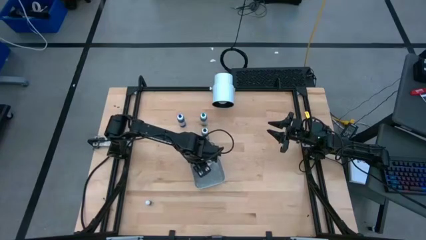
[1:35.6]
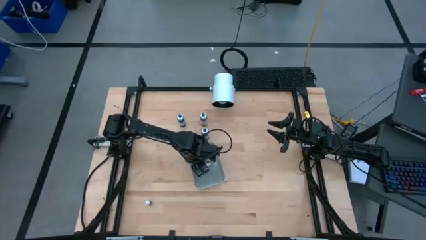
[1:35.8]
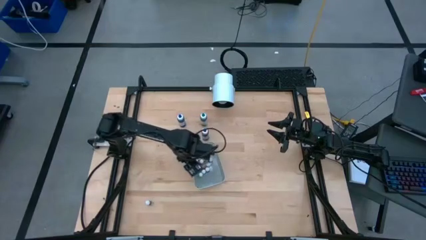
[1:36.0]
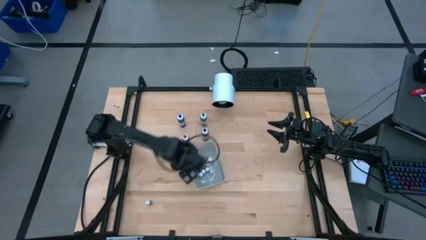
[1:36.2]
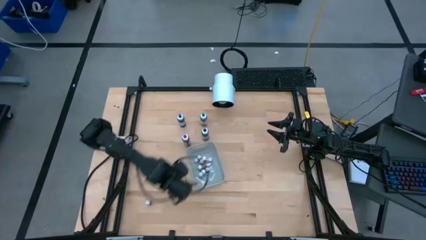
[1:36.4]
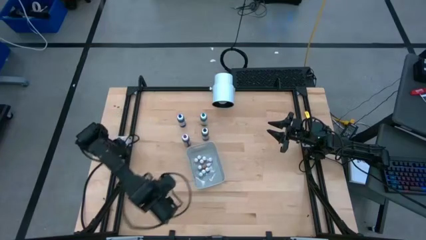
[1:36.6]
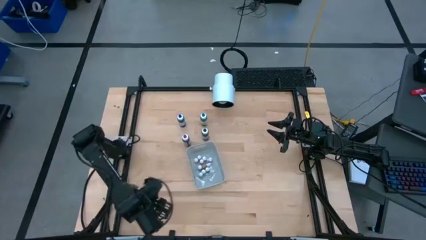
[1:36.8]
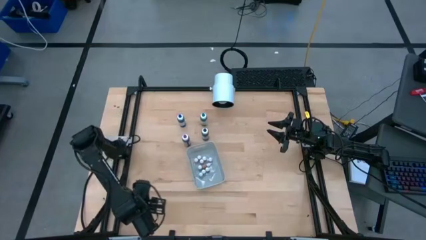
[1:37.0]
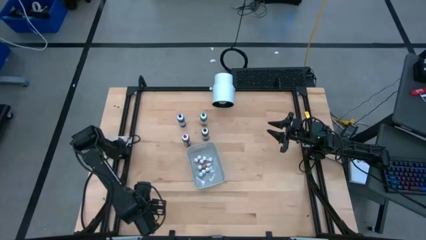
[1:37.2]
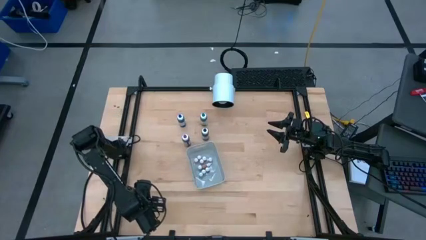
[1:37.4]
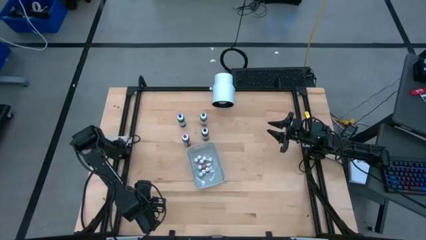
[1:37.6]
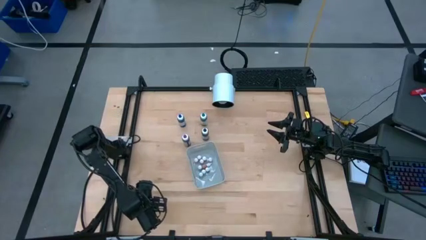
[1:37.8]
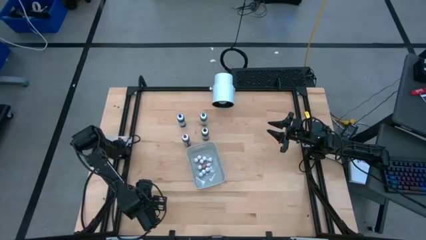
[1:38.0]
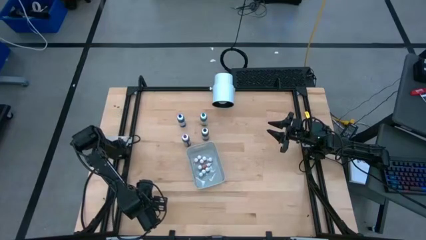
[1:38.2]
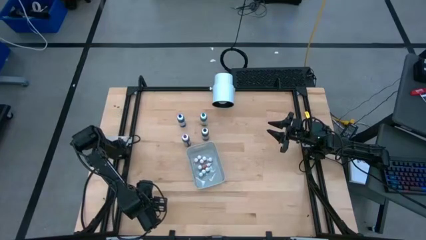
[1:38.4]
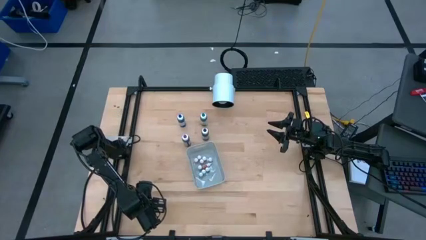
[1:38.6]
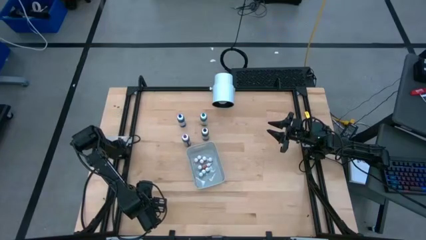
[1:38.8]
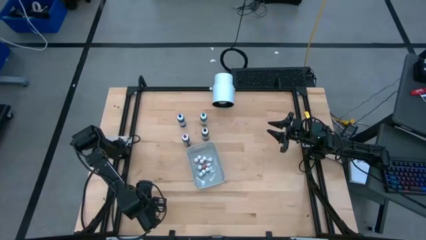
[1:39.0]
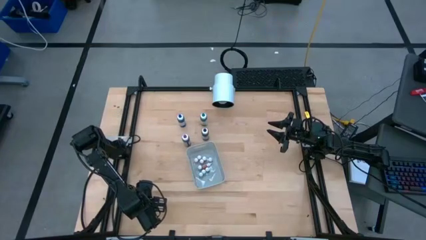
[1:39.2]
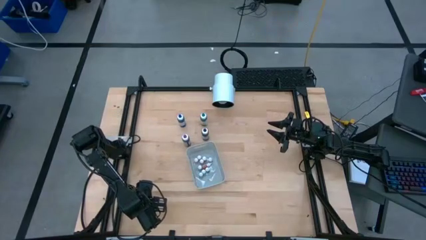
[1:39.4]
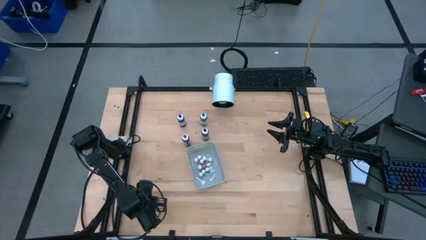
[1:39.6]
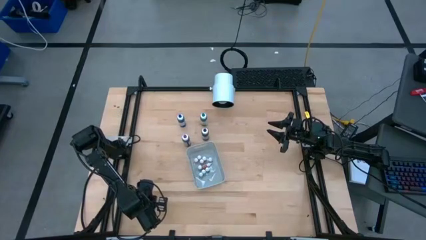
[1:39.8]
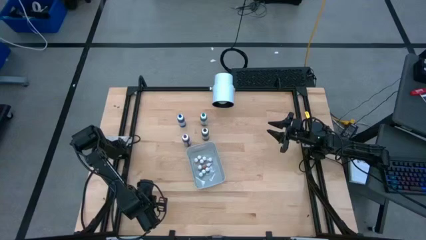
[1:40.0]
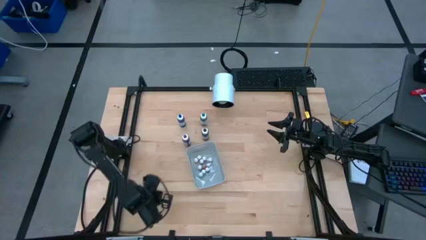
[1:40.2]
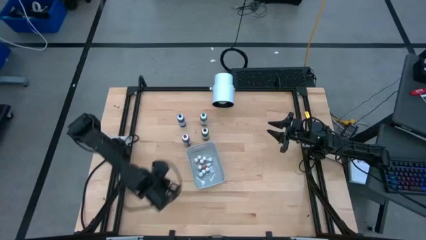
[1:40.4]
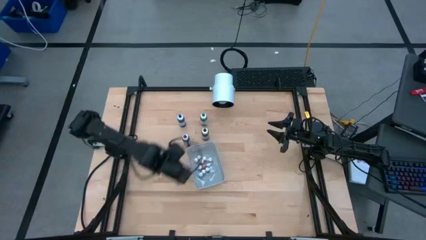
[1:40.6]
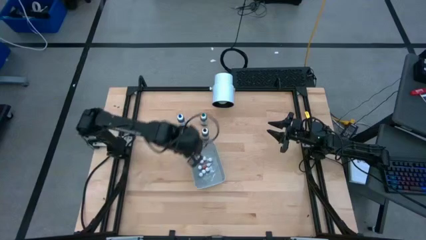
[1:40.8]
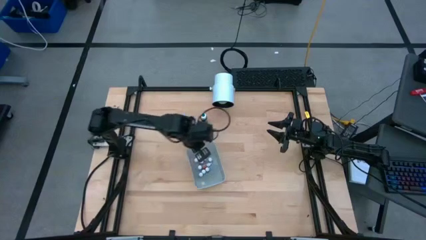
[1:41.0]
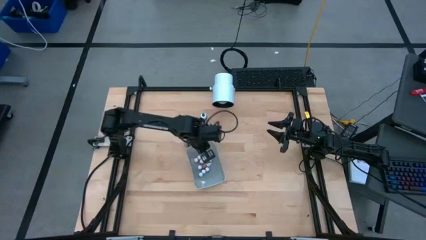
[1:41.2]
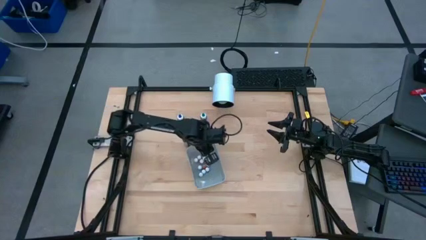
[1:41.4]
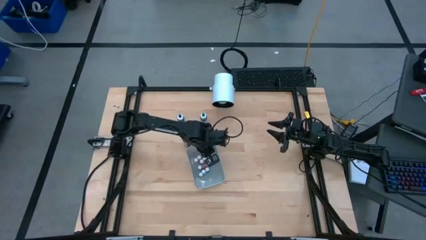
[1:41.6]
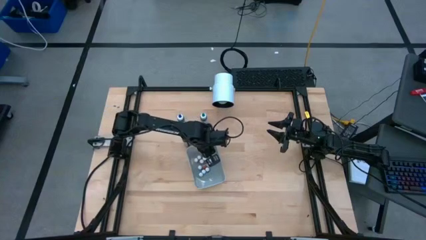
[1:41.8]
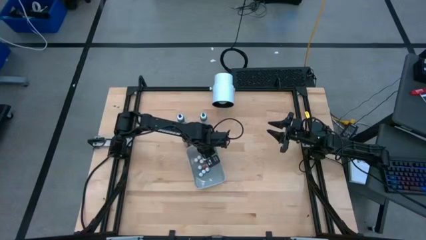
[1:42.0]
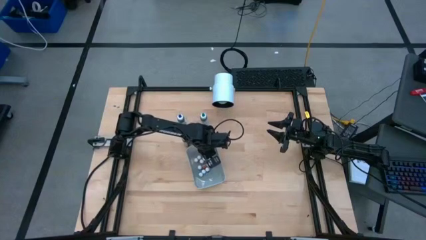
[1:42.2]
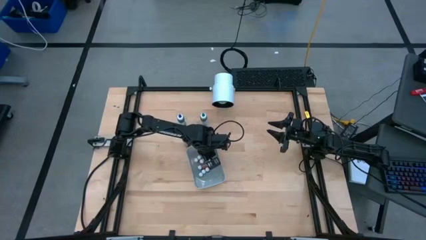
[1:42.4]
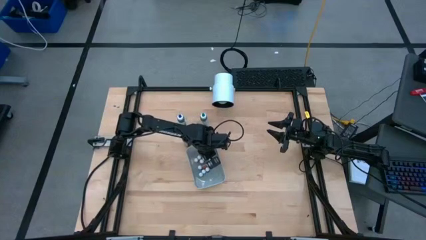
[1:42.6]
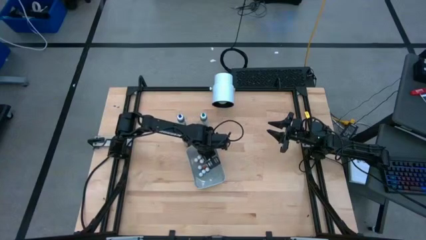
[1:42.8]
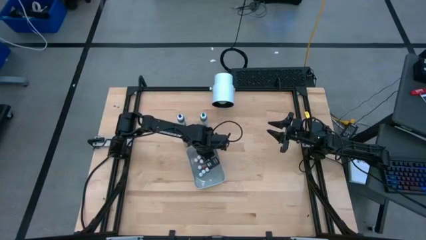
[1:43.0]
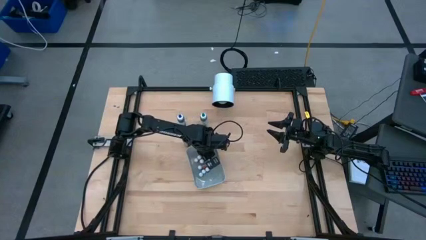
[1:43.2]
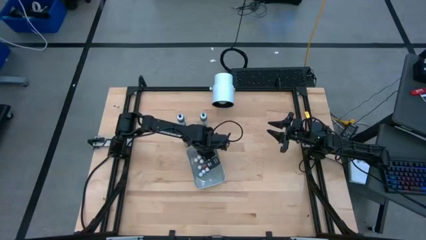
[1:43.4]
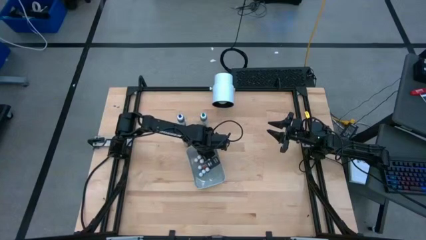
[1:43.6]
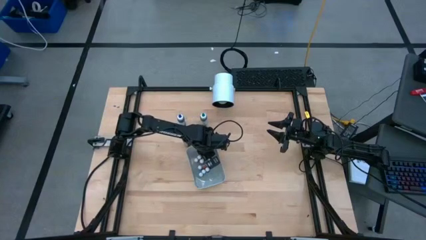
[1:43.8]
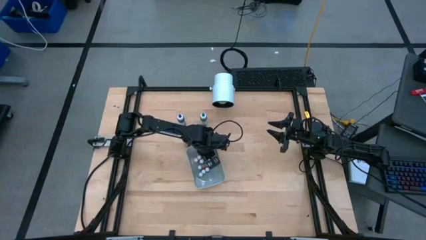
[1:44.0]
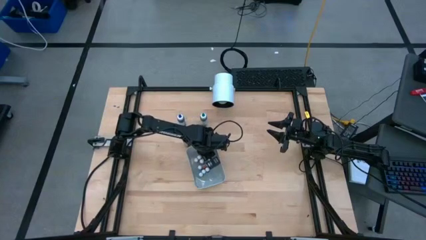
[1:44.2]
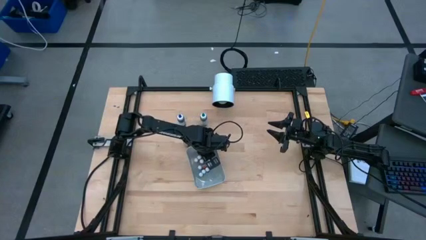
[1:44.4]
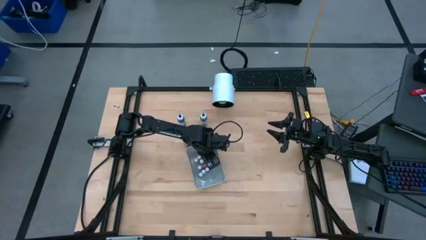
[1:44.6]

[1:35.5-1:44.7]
Task: Pick & Place food coloring
Put the small blue food coloring bottle into the gray bin

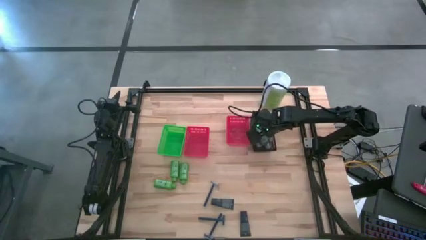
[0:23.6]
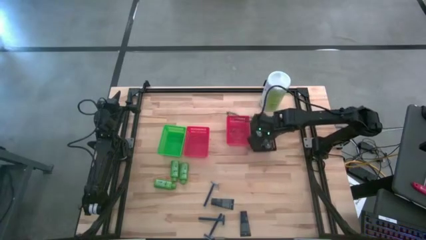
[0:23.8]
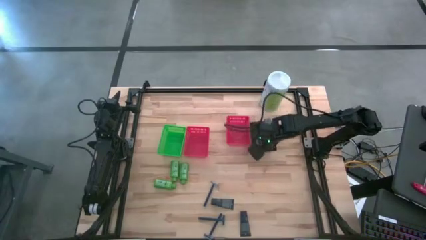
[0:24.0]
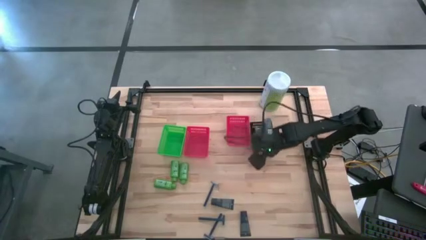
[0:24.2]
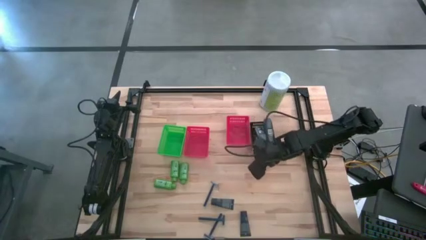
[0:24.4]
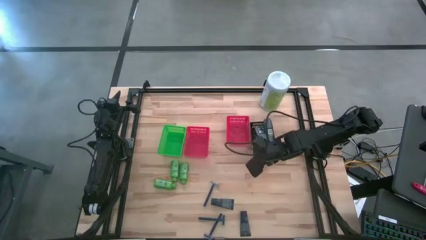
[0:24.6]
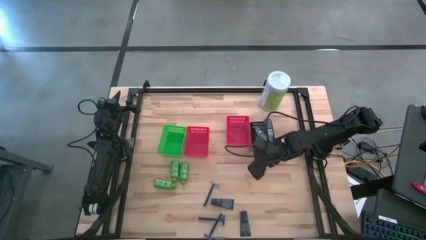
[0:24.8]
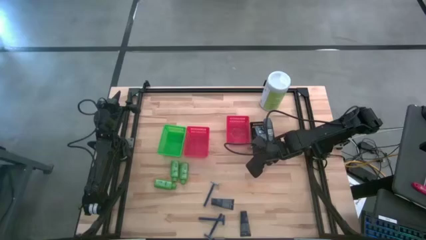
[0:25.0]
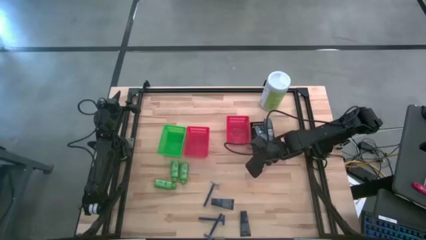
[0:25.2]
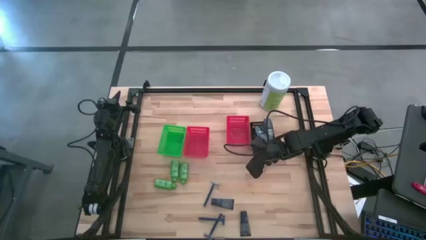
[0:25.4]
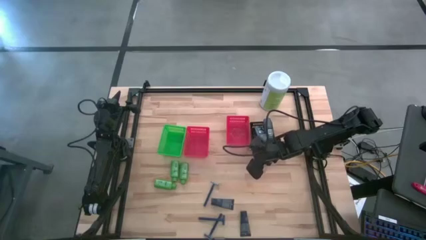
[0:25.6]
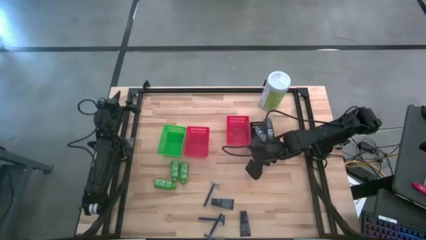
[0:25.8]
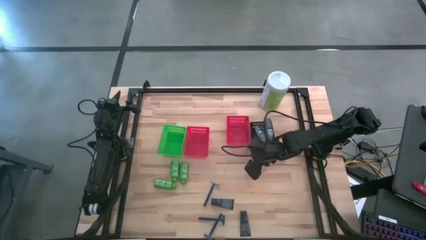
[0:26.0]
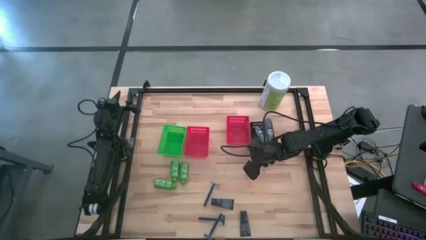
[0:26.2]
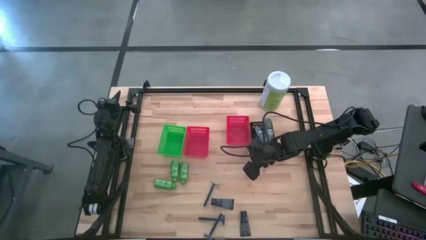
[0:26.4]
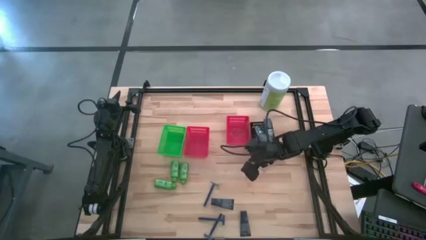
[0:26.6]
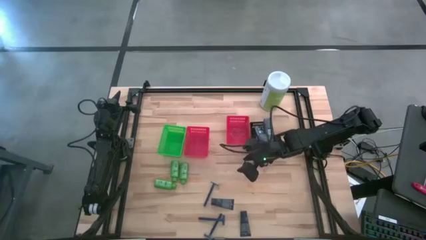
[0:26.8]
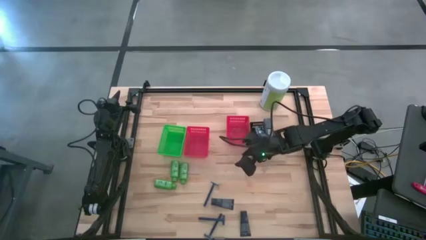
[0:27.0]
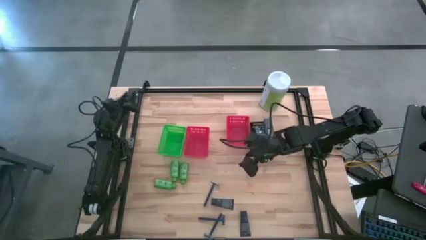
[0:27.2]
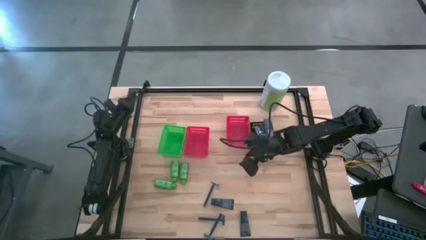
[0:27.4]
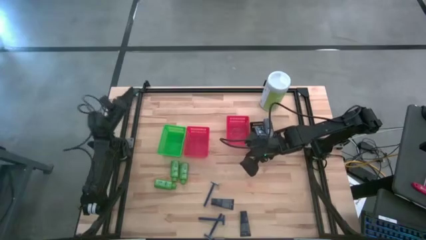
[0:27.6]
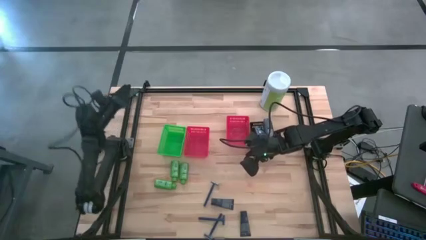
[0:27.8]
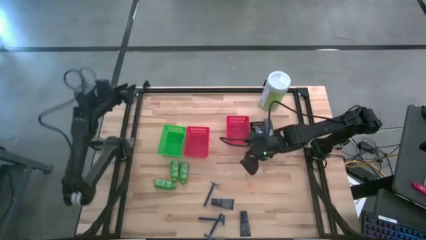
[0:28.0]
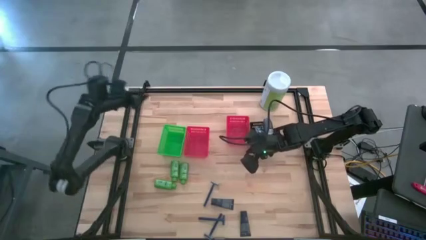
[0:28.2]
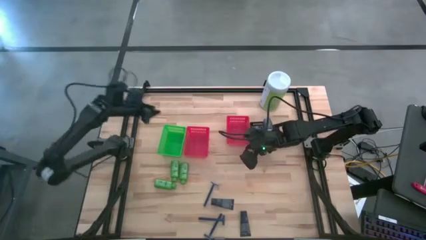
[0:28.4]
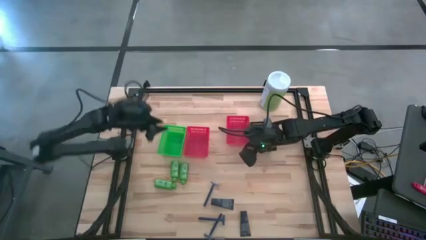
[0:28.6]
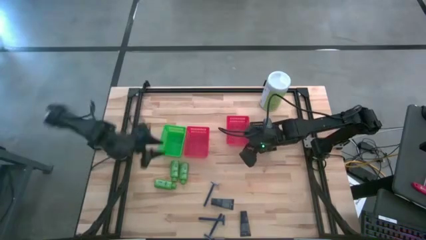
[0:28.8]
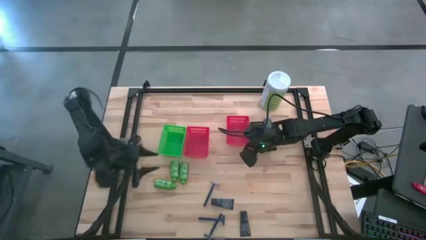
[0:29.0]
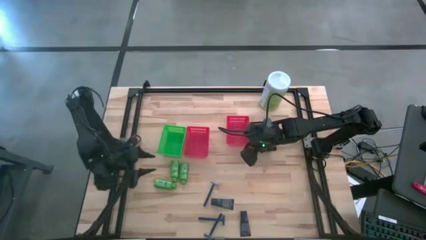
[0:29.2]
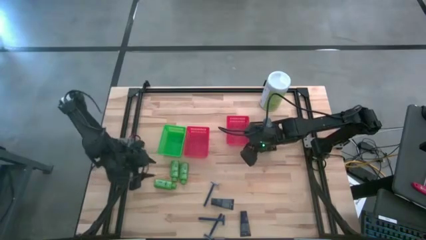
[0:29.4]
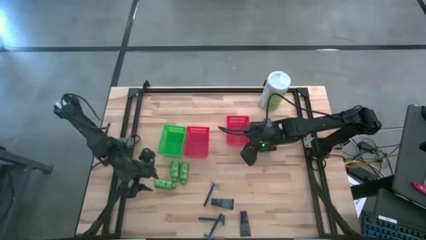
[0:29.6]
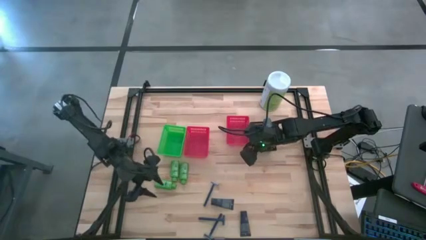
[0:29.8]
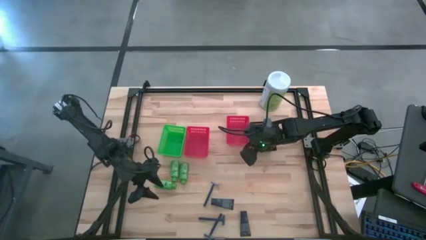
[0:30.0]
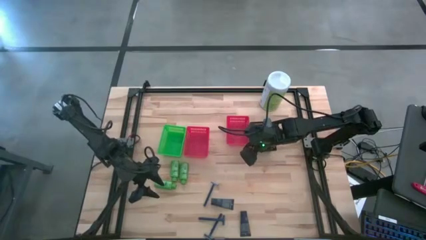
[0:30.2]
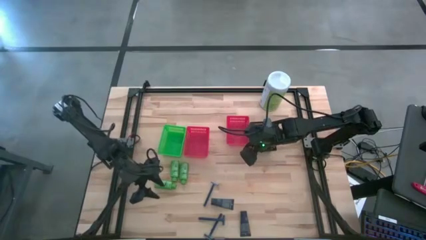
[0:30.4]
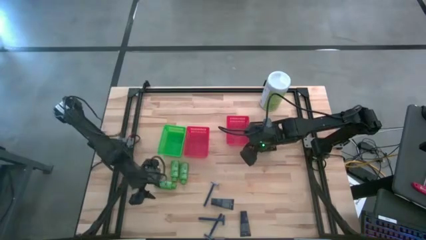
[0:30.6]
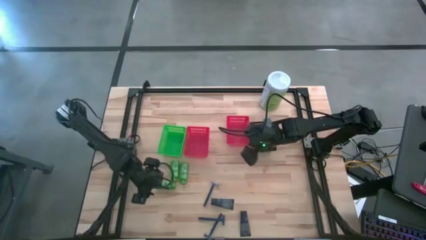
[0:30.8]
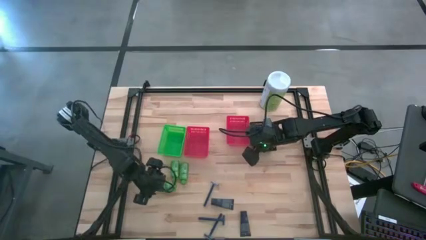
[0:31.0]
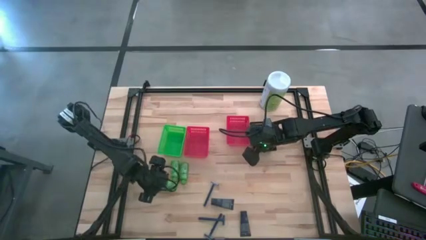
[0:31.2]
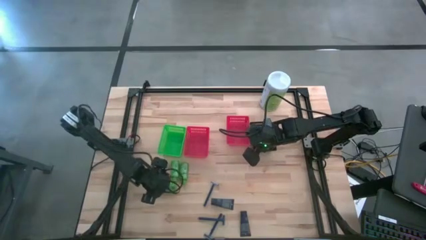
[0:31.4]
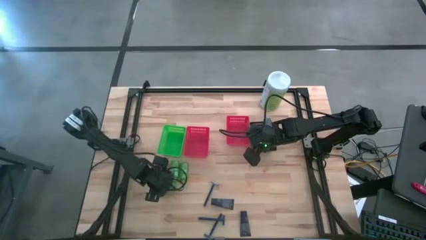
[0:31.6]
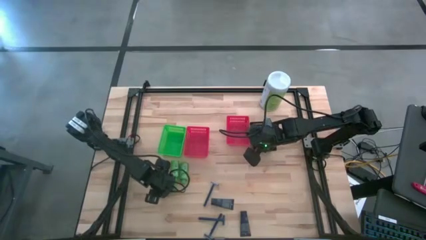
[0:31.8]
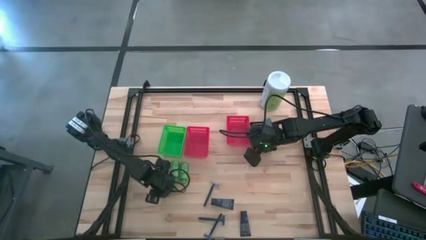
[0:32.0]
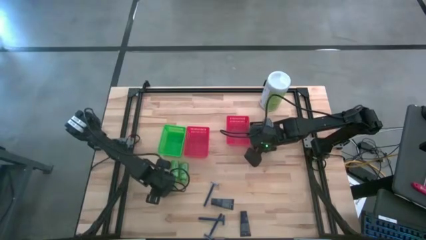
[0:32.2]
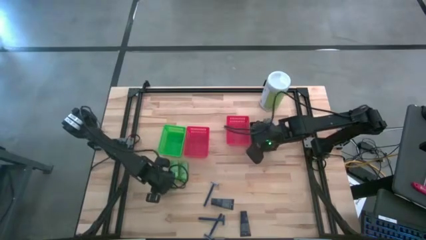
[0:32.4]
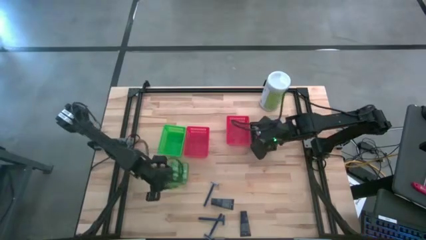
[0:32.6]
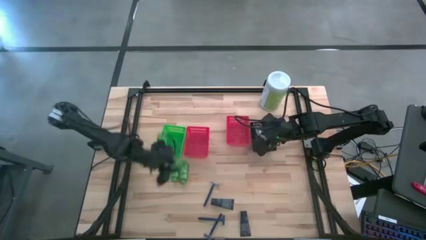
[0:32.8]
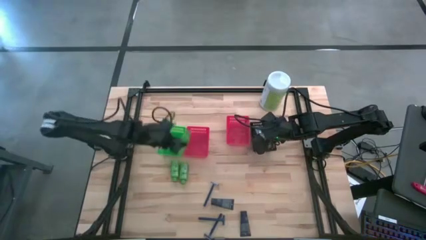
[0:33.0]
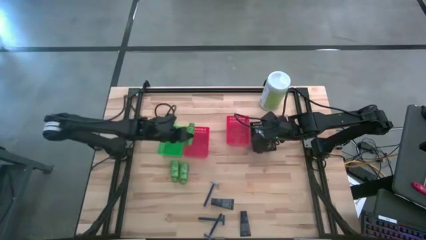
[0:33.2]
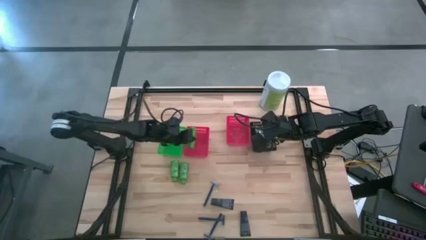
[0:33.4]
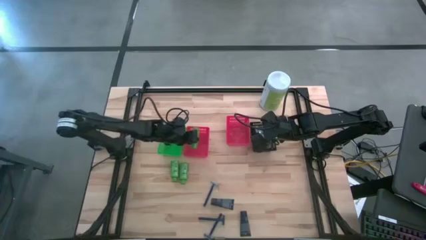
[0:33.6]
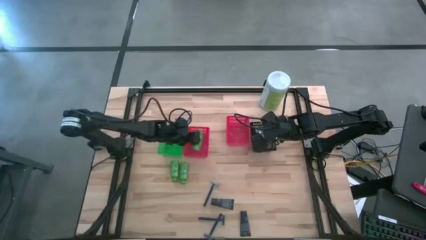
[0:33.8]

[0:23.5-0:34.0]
Task: Pick & Place Travel size toiletries
Put the green shampoo into the left red basket
